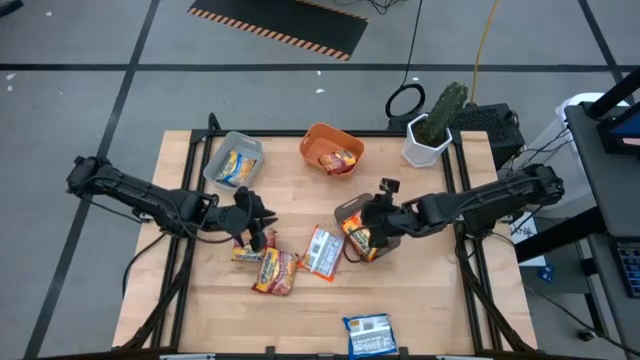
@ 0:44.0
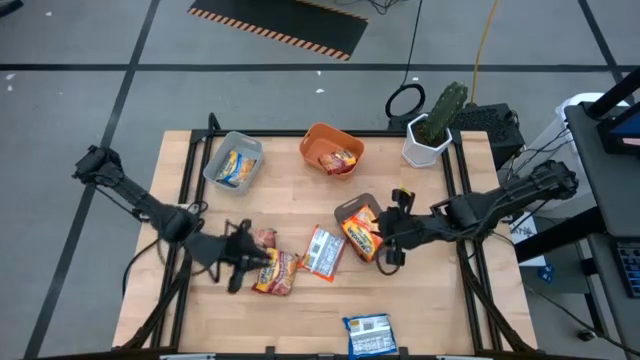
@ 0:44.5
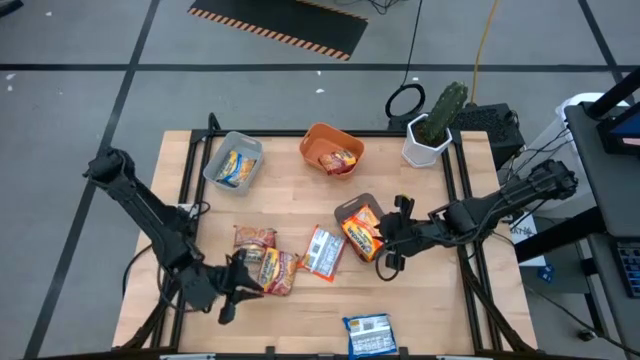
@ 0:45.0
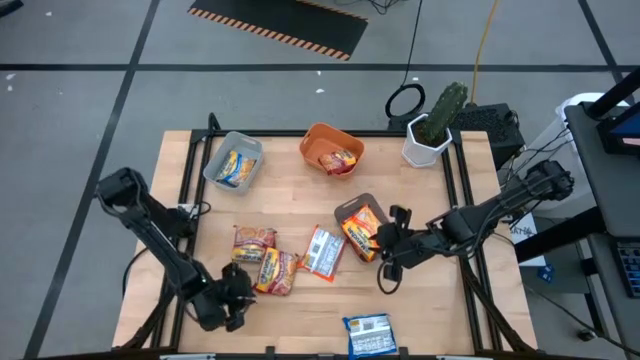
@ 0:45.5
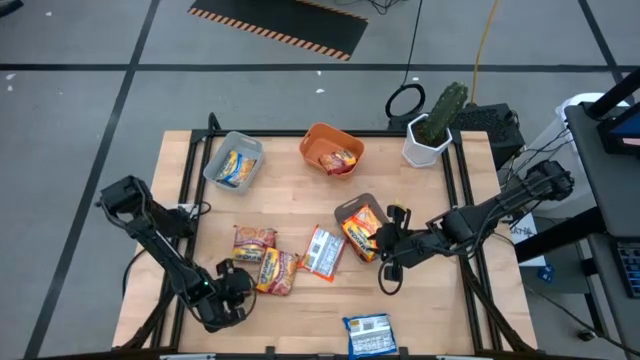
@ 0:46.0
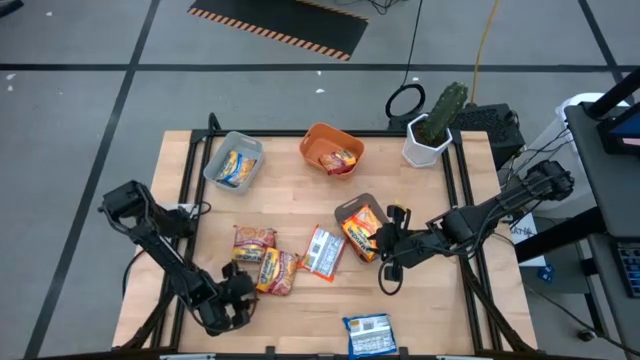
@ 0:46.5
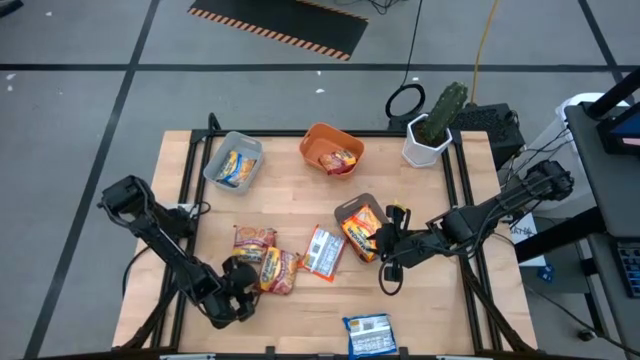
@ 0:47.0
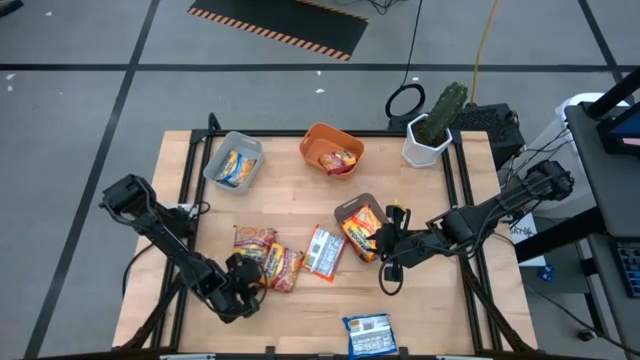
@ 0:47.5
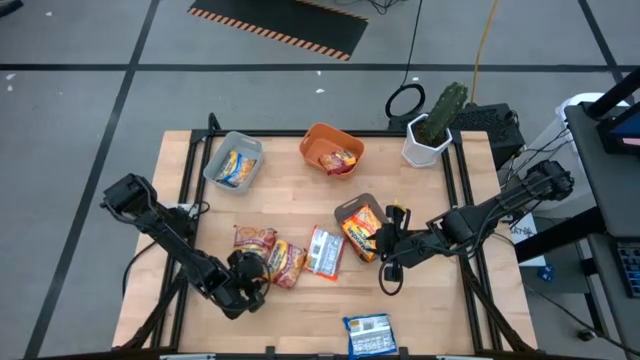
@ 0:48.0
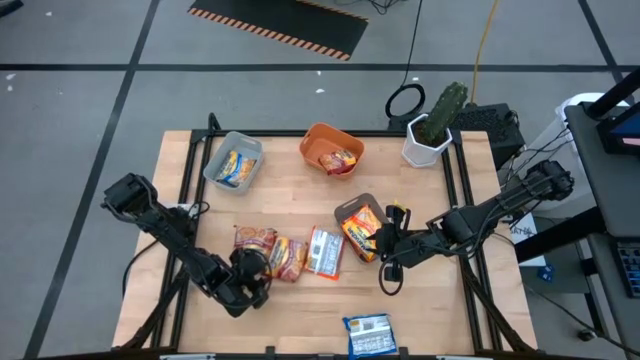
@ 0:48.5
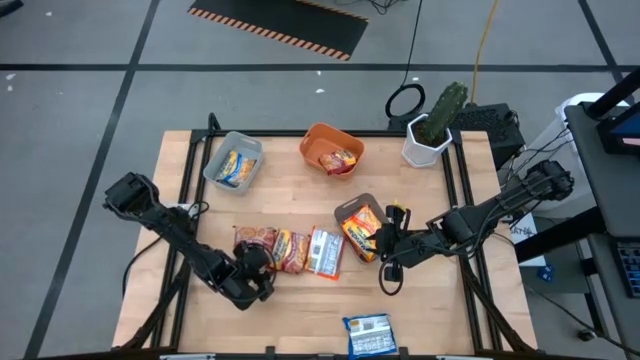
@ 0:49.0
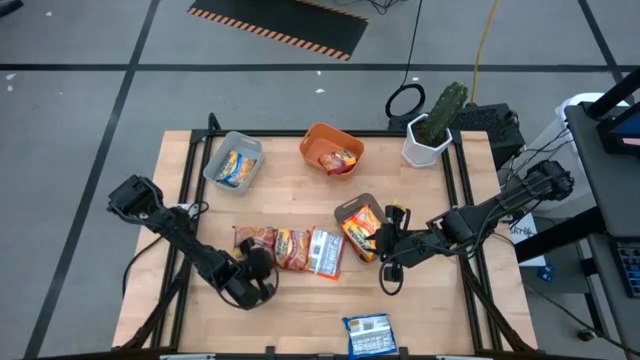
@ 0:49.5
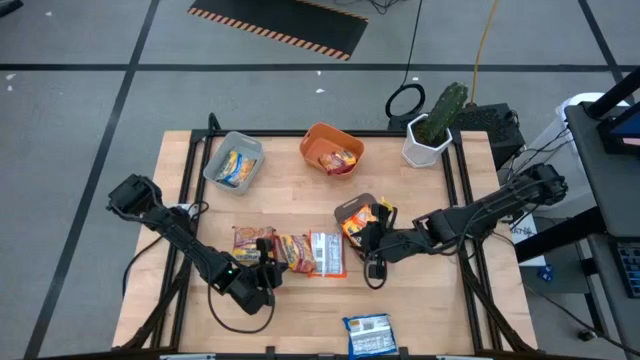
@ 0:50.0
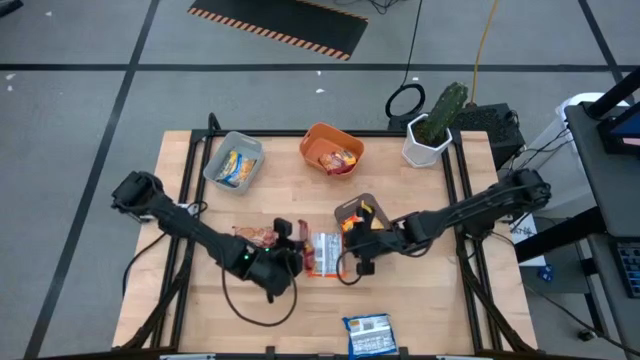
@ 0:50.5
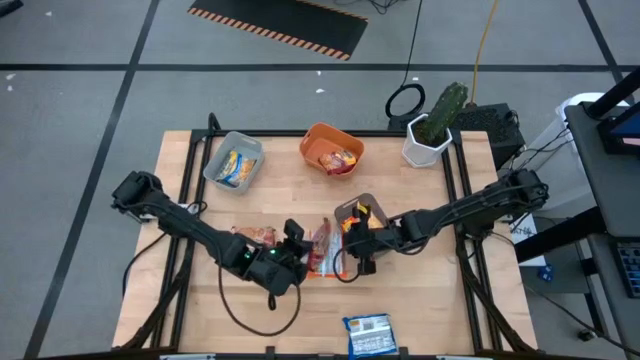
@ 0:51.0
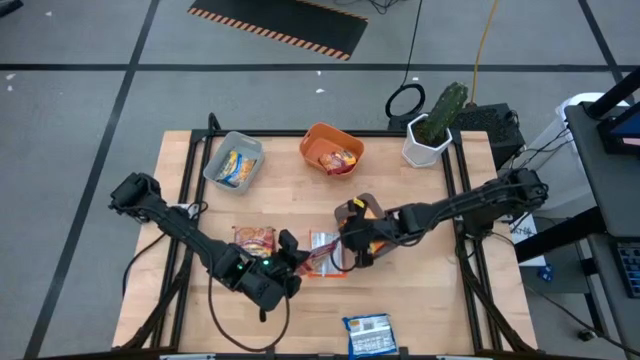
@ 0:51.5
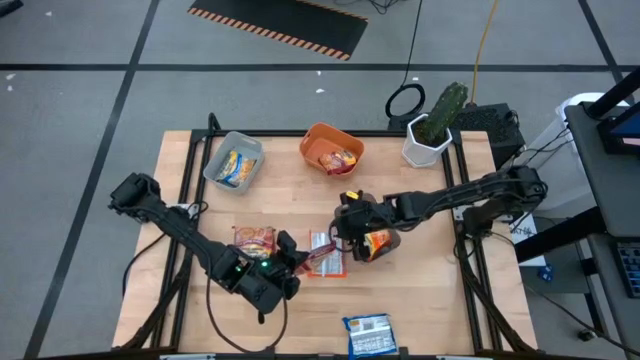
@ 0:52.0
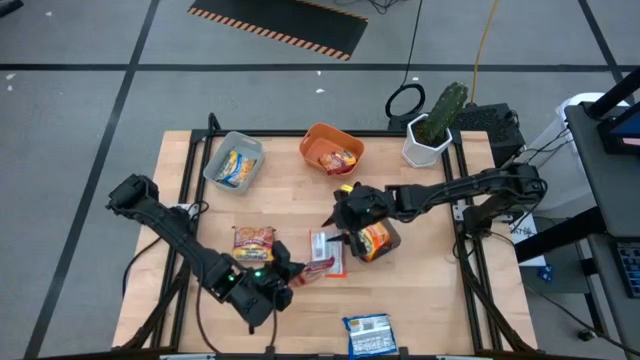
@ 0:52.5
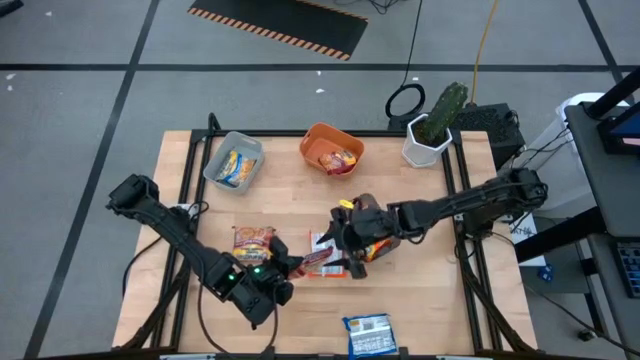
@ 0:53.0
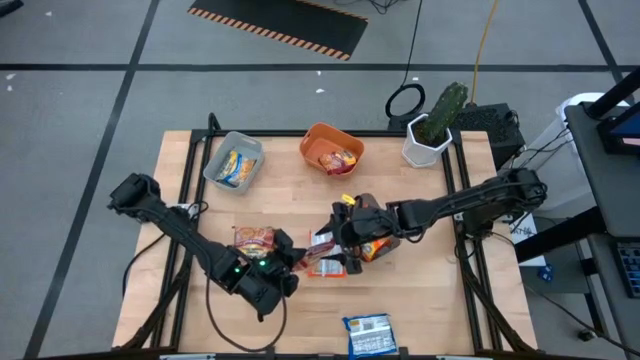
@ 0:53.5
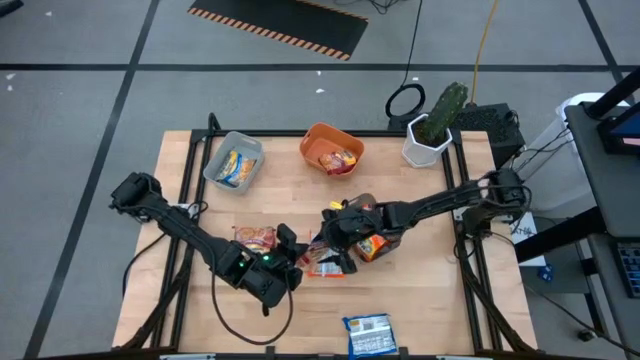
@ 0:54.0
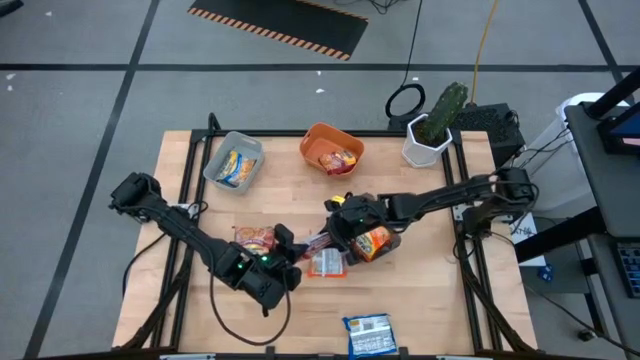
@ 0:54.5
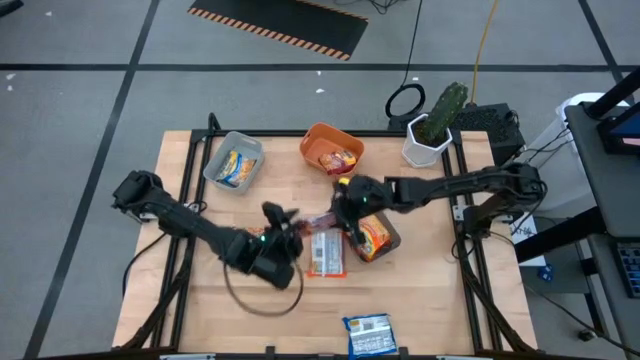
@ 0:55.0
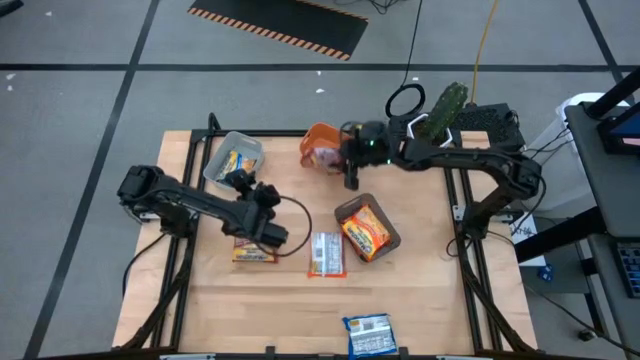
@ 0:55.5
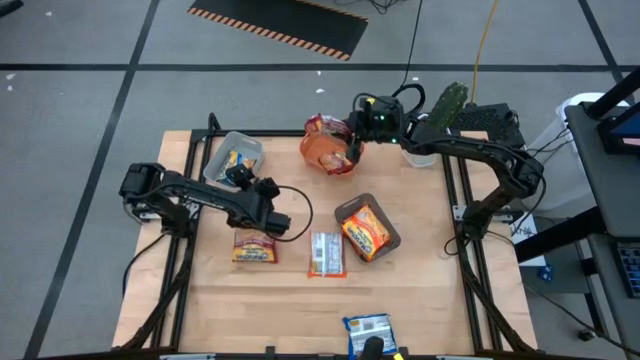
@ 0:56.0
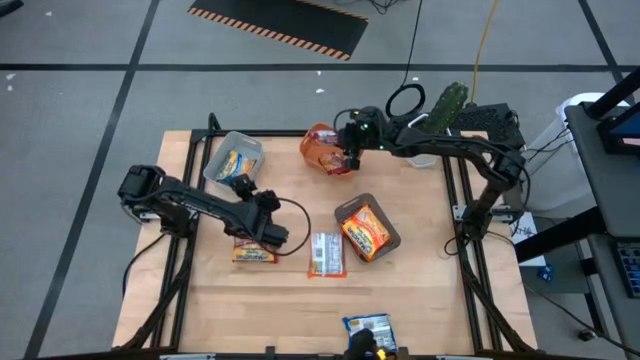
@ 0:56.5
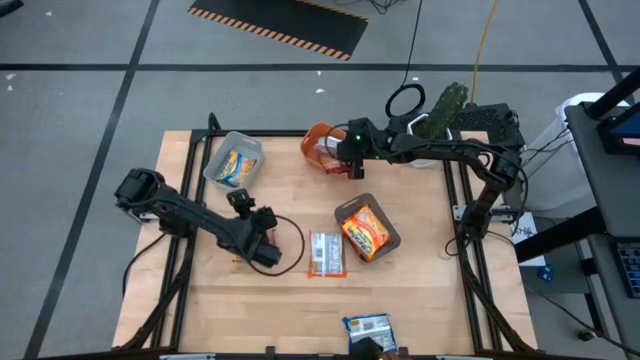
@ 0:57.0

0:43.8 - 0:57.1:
Task: Sort Maruchan noodles
Put the right red noodle pack into the orange bin

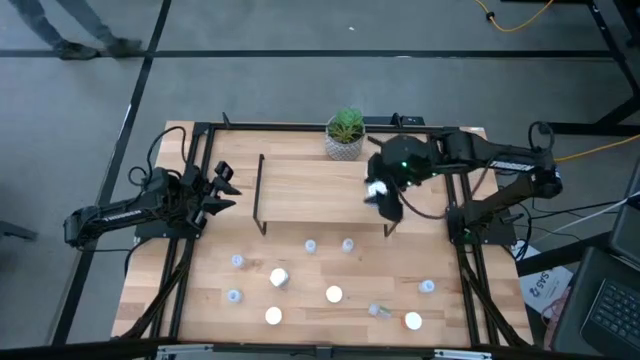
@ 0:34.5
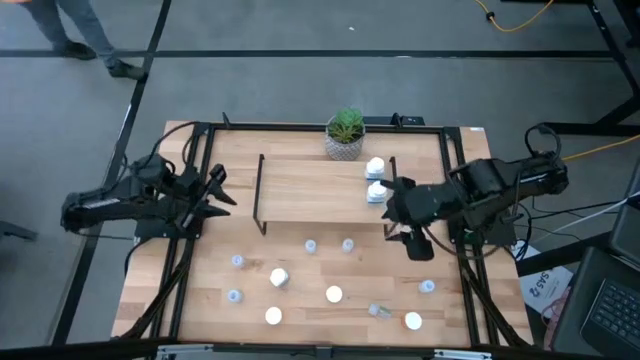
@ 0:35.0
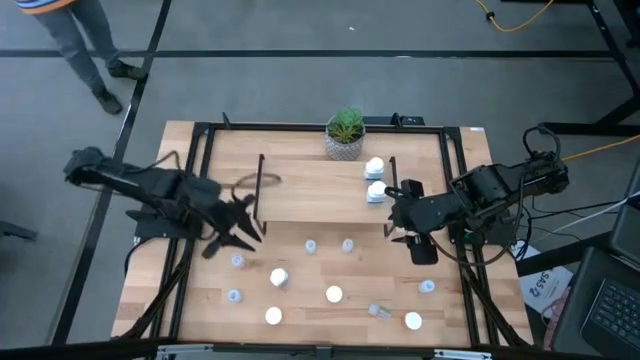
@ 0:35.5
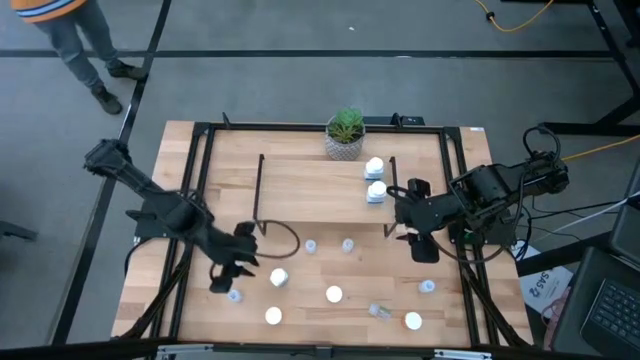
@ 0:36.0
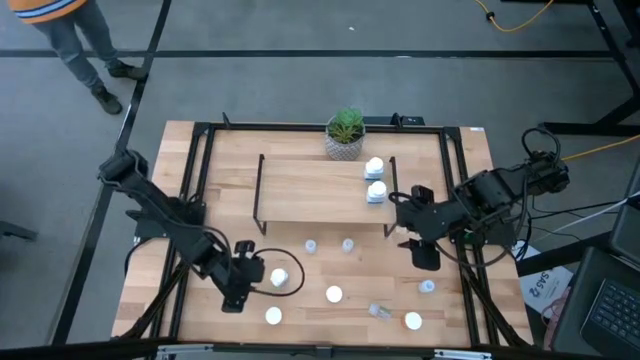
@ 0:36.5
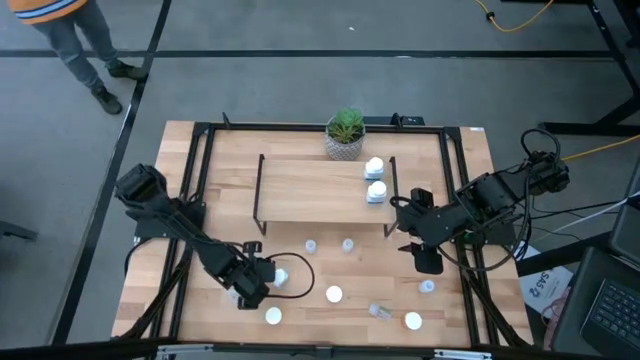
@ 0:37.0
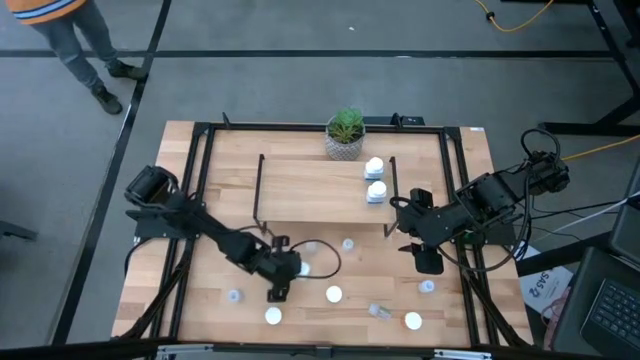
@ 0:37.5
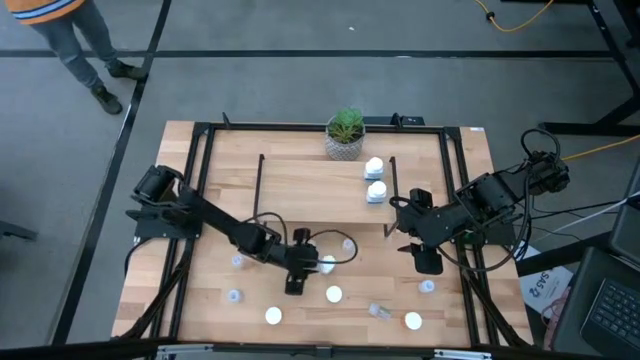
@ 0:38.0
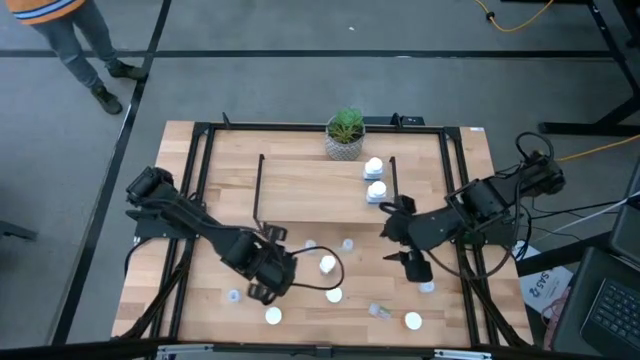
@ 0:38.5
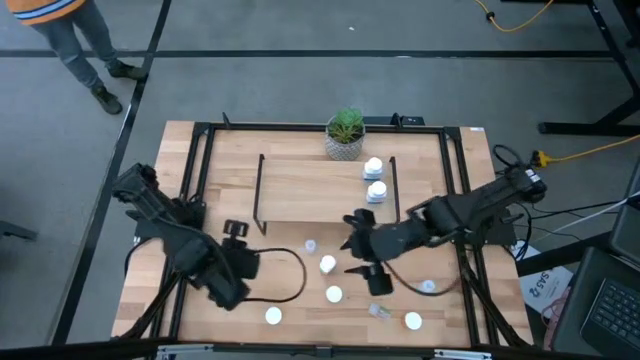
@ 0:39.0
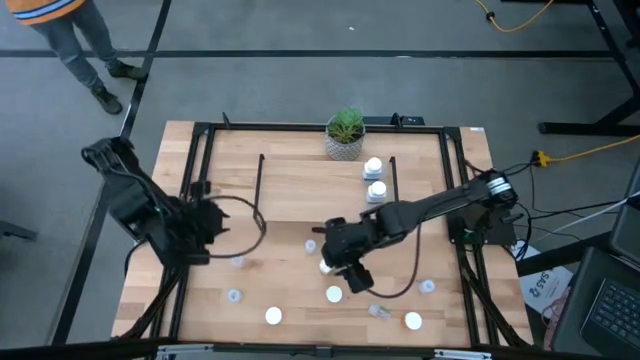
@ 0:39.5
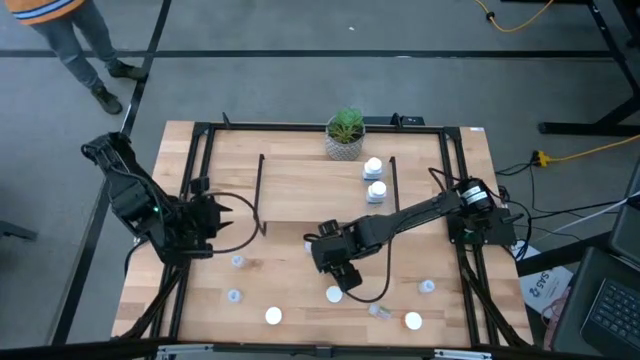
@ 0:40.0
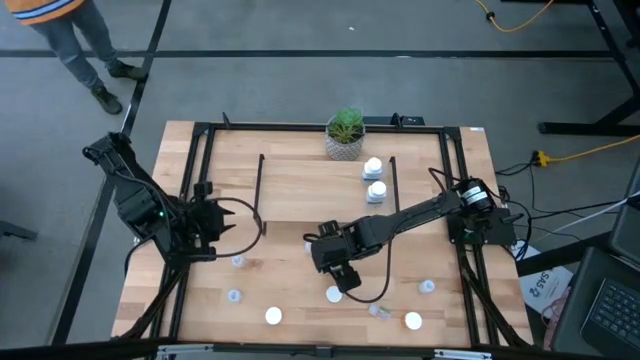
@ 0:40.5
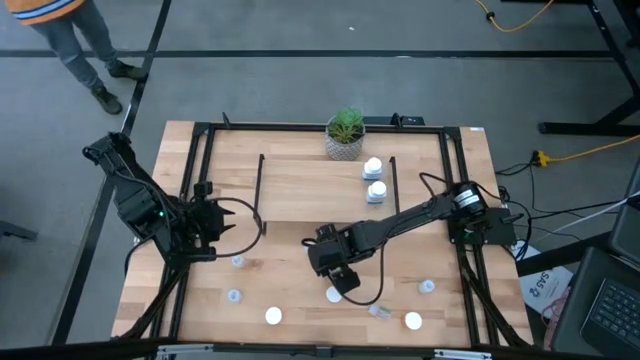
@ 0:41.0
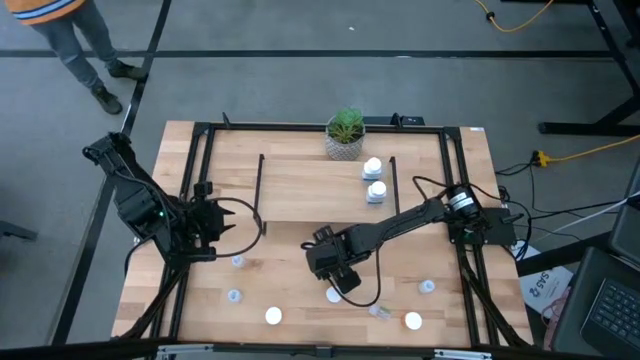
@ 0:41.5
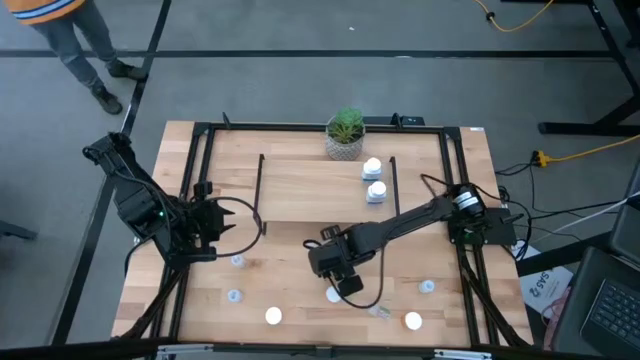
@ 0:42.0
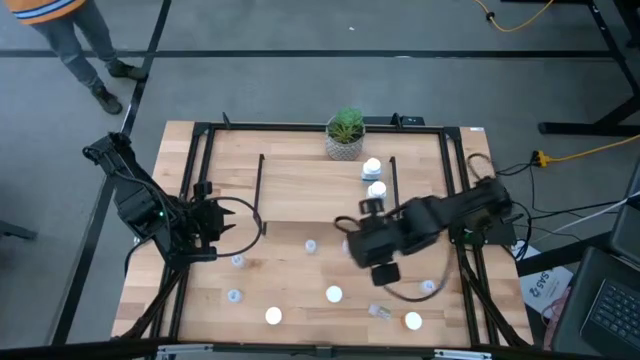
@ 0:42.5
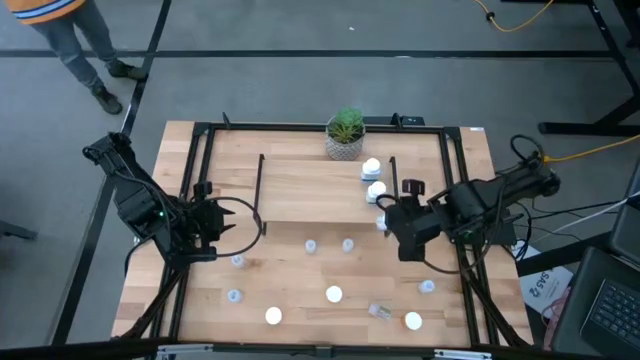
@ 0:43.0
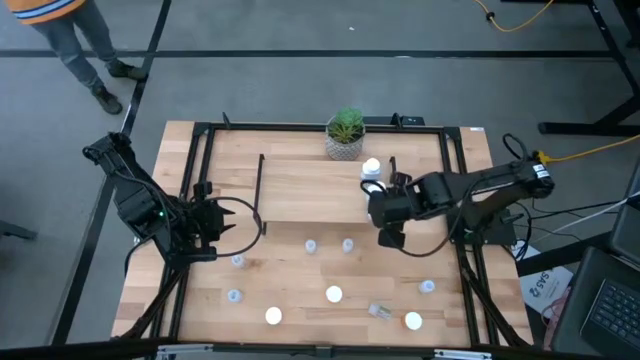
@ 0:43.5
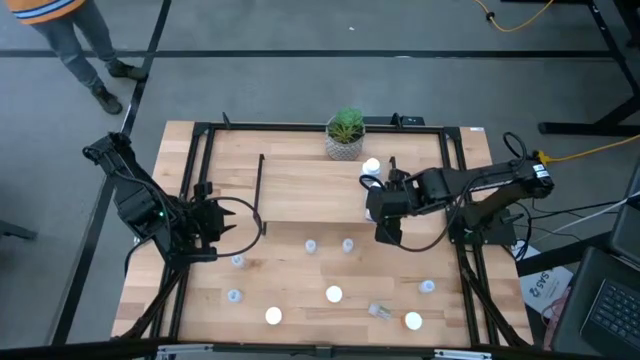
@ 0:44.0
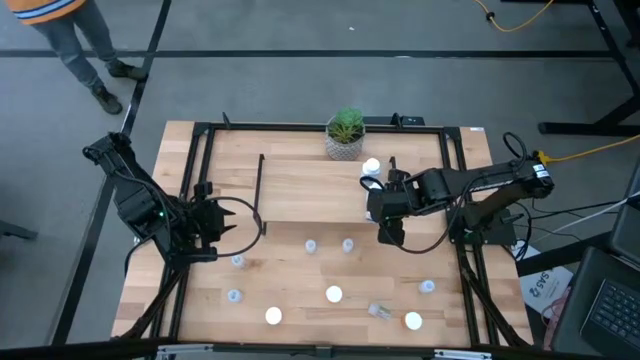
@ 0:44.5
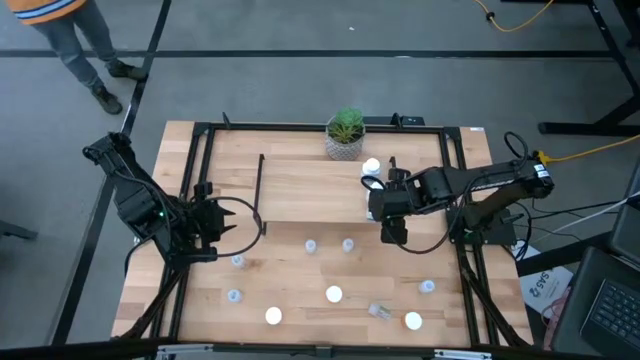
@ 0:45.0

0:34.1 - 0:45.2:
Task: Pick and place medicine bottles onto shelf by color
Put the white medicine bottle on the shelf aligned with the other white medicine bottle
